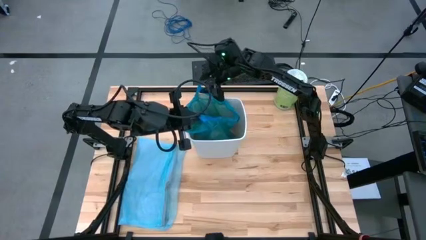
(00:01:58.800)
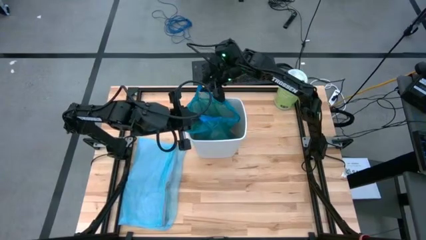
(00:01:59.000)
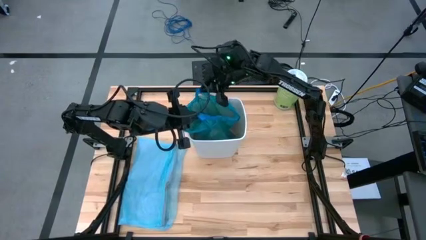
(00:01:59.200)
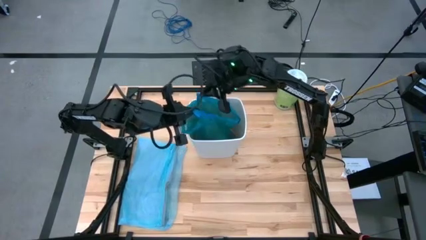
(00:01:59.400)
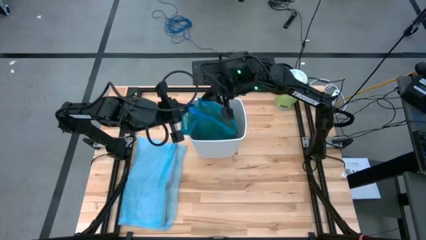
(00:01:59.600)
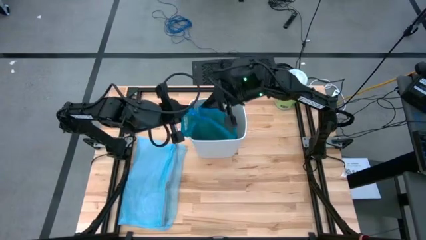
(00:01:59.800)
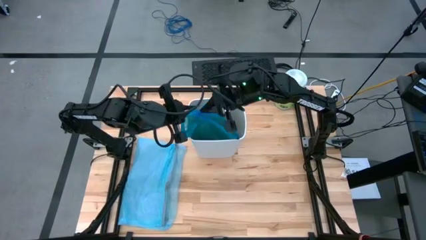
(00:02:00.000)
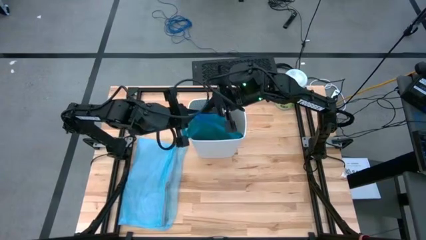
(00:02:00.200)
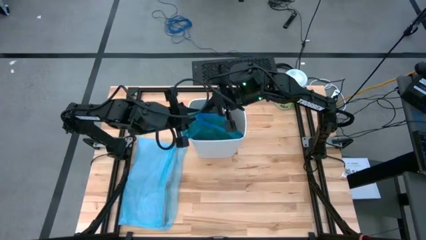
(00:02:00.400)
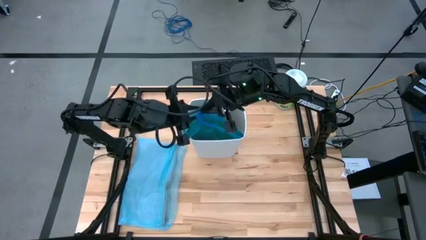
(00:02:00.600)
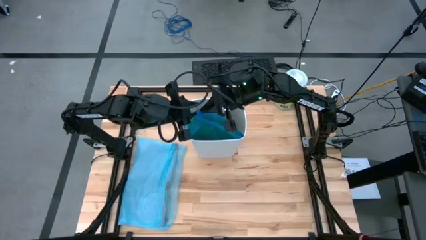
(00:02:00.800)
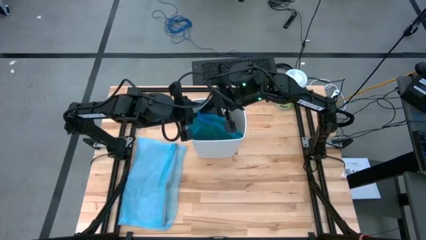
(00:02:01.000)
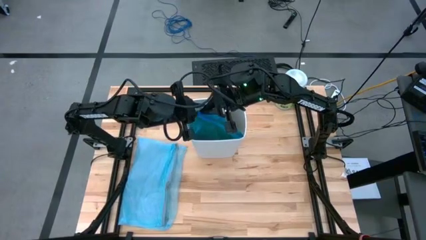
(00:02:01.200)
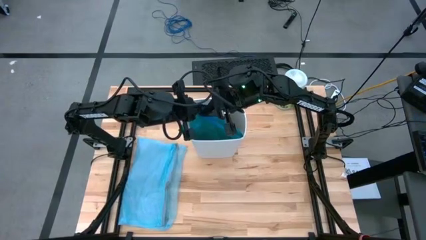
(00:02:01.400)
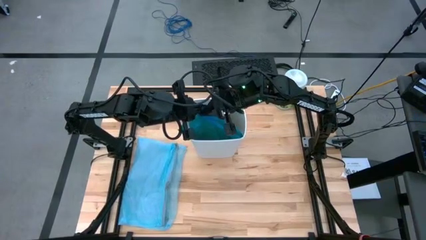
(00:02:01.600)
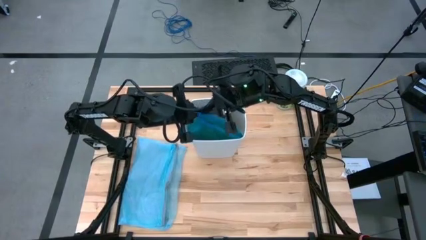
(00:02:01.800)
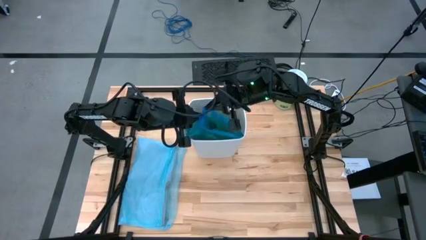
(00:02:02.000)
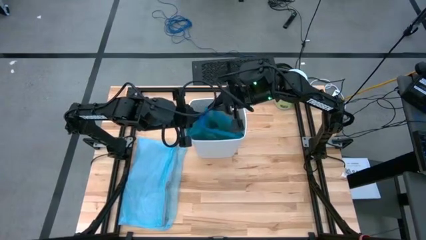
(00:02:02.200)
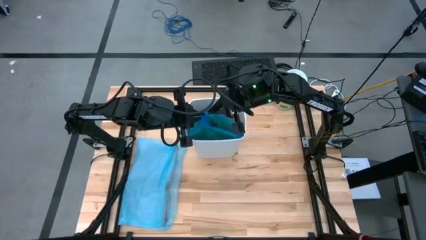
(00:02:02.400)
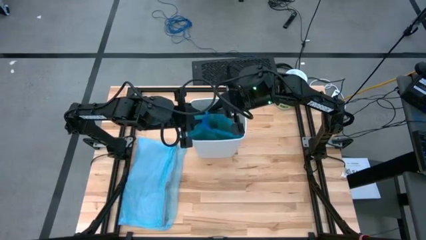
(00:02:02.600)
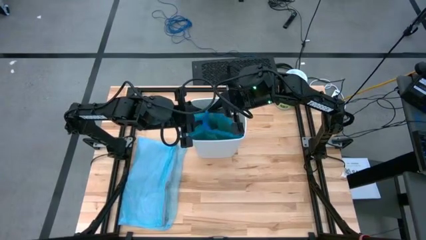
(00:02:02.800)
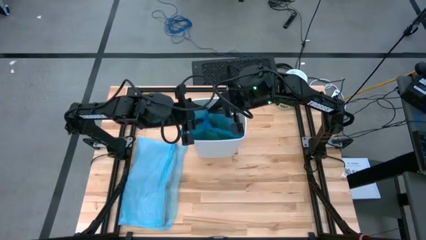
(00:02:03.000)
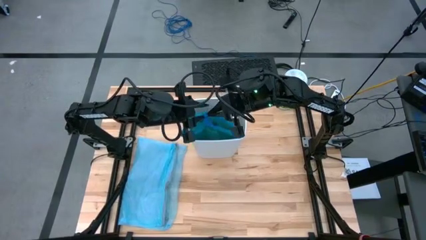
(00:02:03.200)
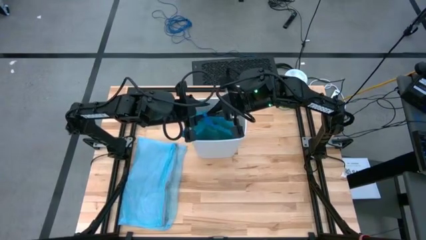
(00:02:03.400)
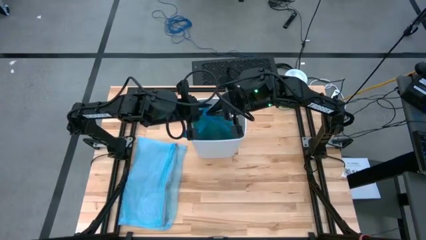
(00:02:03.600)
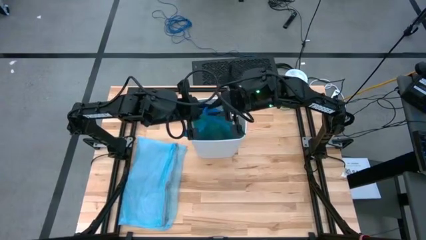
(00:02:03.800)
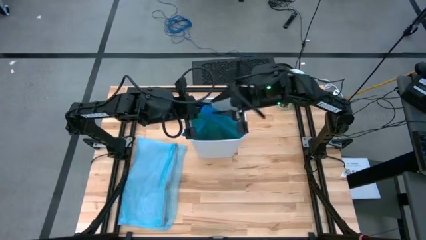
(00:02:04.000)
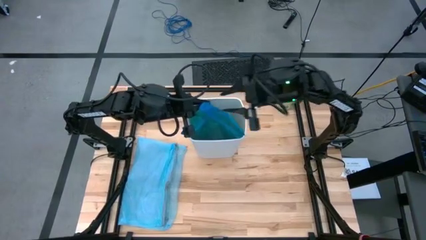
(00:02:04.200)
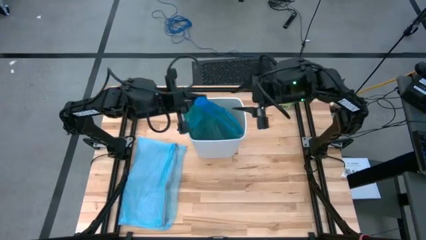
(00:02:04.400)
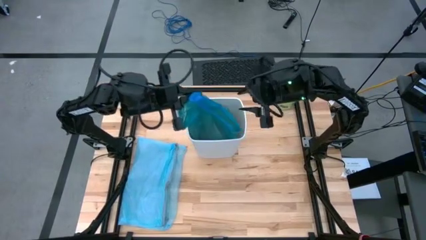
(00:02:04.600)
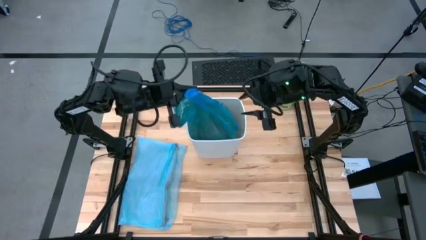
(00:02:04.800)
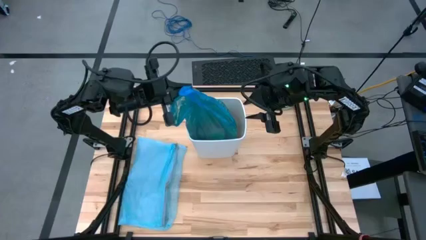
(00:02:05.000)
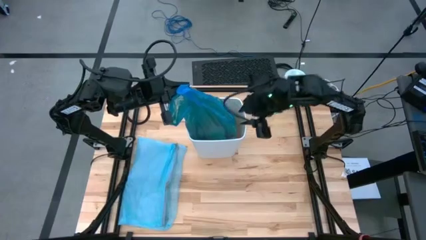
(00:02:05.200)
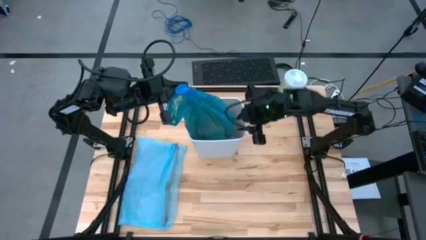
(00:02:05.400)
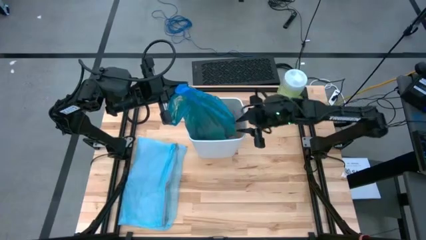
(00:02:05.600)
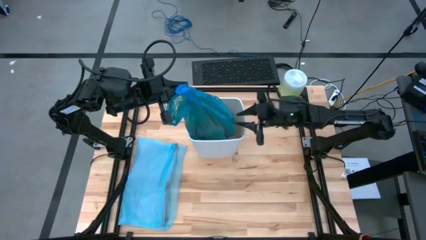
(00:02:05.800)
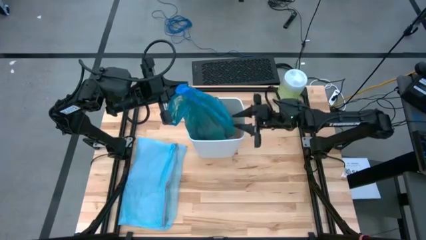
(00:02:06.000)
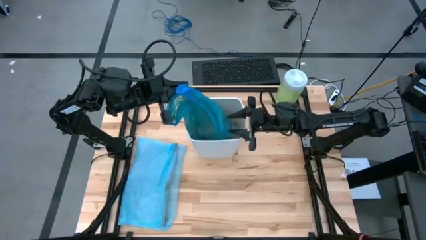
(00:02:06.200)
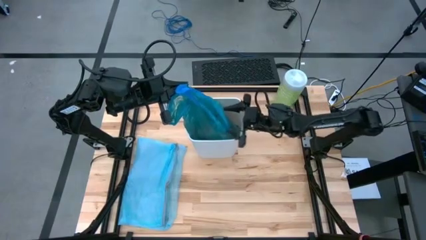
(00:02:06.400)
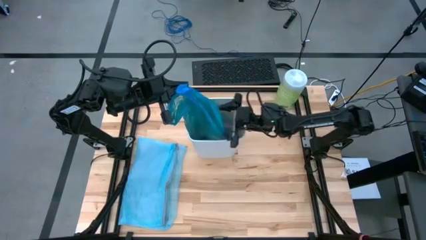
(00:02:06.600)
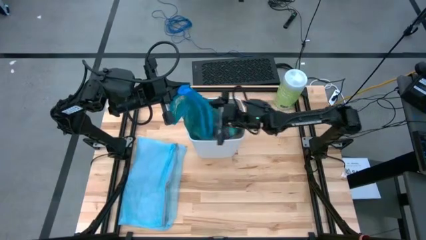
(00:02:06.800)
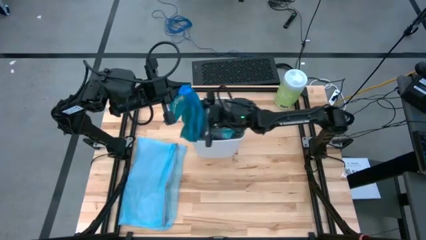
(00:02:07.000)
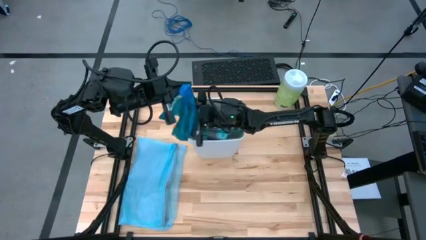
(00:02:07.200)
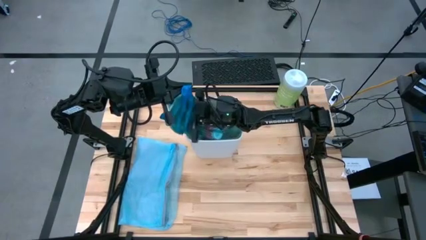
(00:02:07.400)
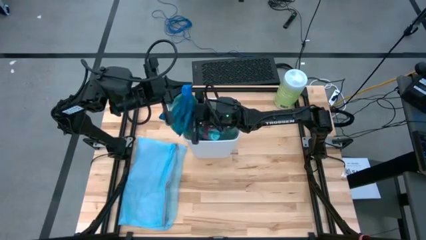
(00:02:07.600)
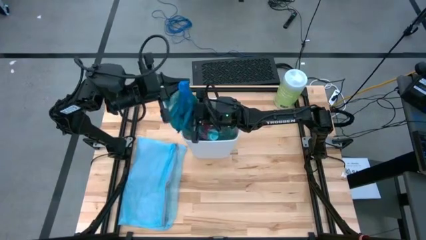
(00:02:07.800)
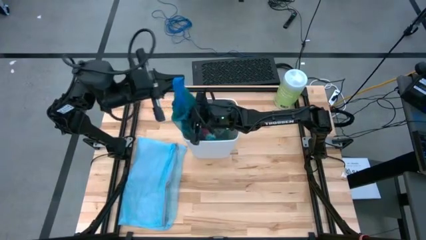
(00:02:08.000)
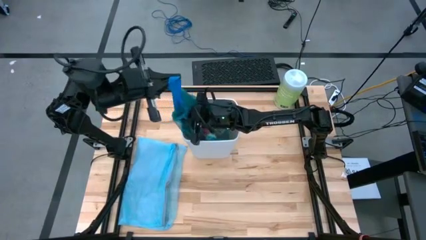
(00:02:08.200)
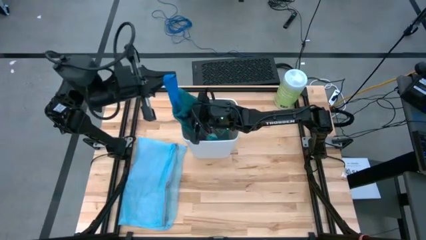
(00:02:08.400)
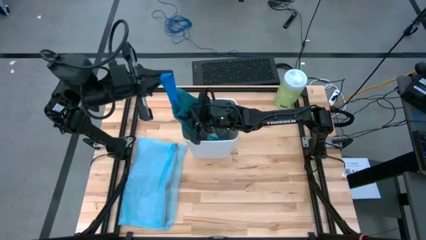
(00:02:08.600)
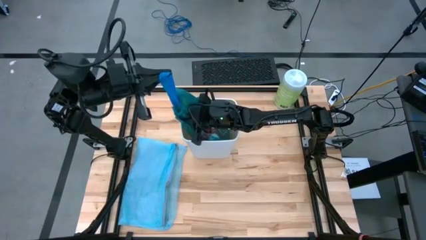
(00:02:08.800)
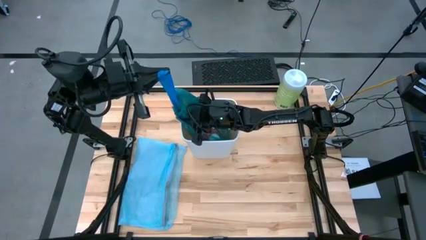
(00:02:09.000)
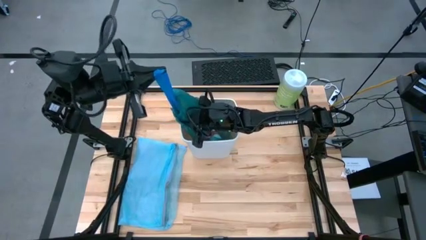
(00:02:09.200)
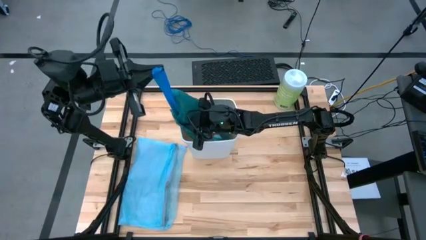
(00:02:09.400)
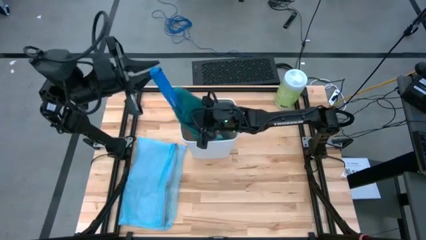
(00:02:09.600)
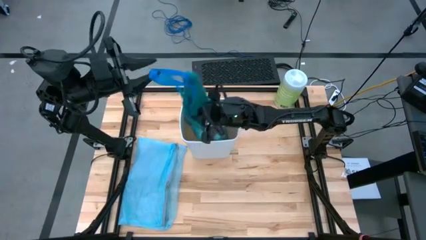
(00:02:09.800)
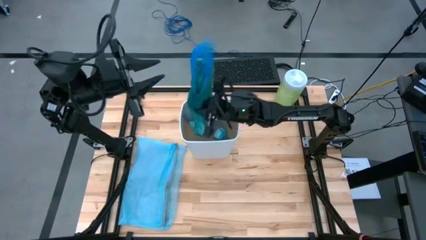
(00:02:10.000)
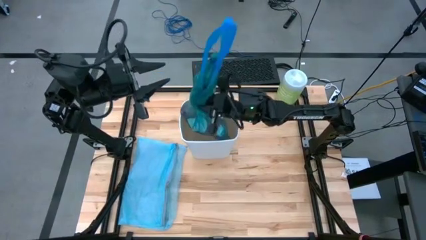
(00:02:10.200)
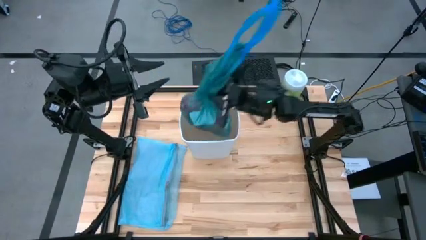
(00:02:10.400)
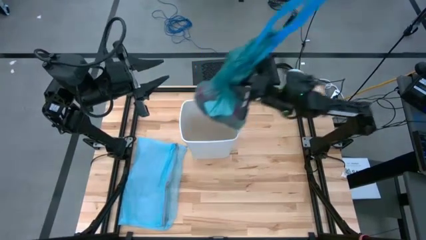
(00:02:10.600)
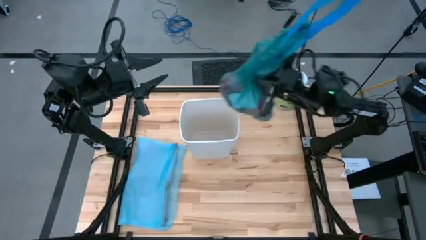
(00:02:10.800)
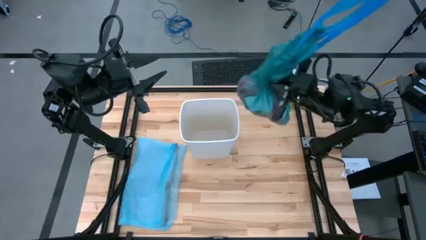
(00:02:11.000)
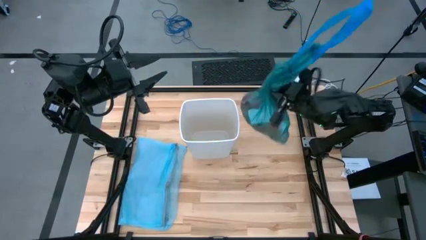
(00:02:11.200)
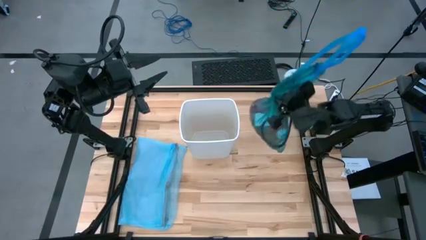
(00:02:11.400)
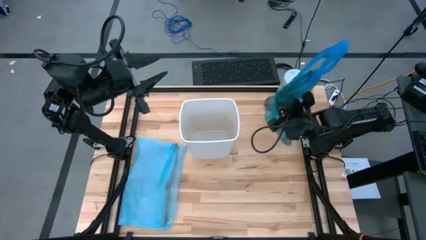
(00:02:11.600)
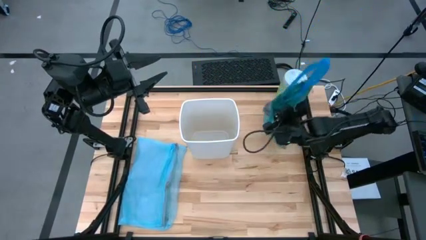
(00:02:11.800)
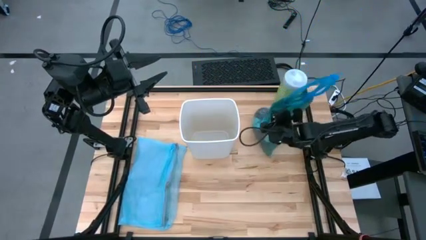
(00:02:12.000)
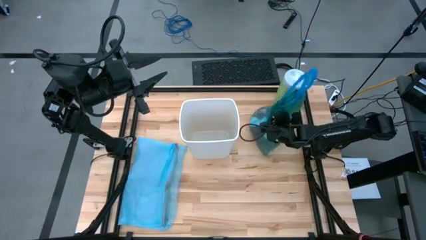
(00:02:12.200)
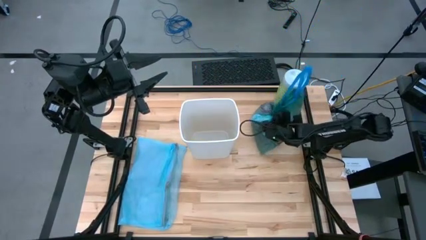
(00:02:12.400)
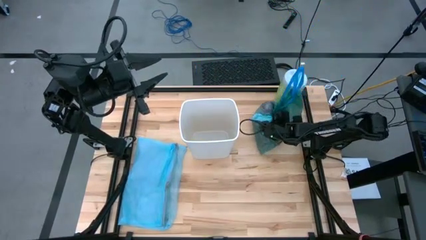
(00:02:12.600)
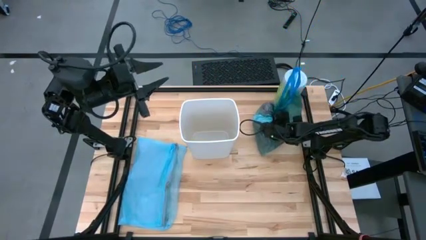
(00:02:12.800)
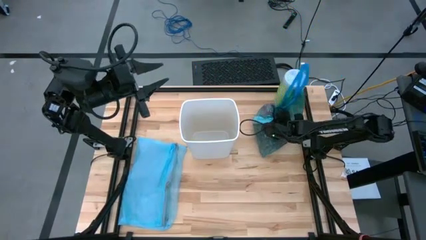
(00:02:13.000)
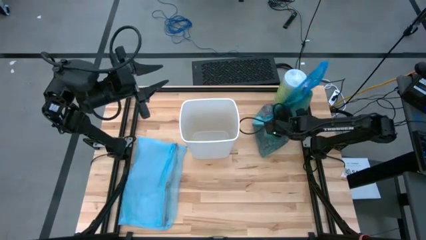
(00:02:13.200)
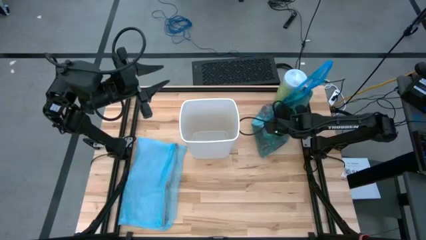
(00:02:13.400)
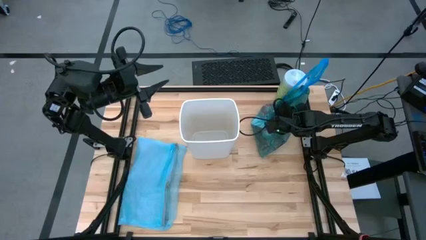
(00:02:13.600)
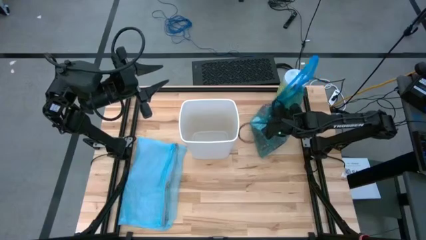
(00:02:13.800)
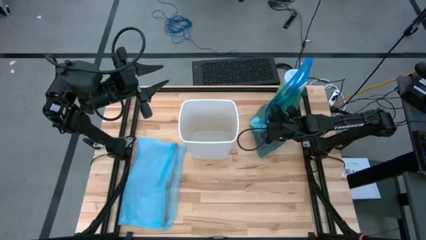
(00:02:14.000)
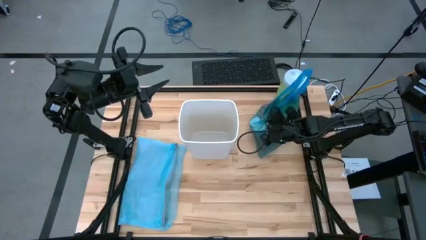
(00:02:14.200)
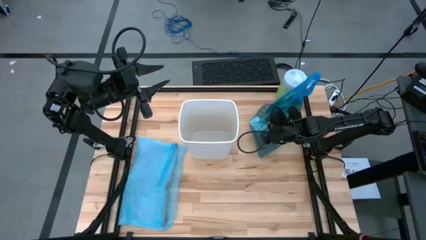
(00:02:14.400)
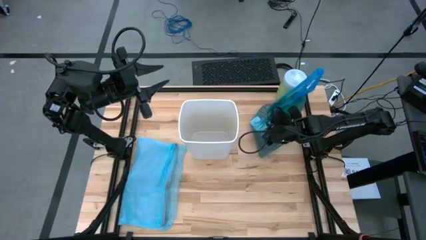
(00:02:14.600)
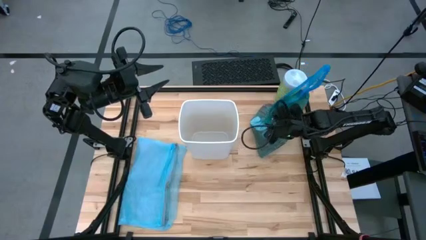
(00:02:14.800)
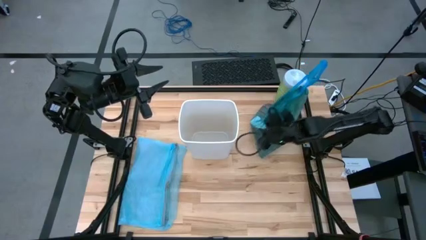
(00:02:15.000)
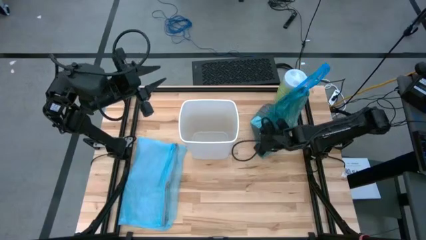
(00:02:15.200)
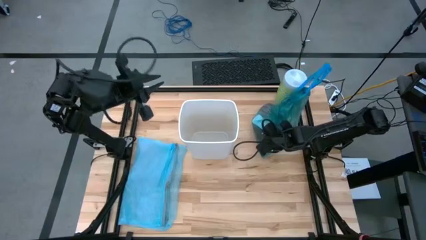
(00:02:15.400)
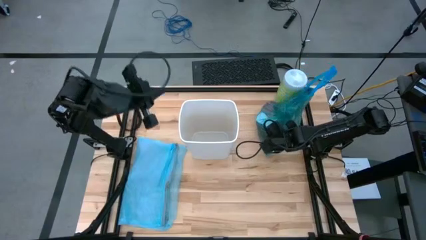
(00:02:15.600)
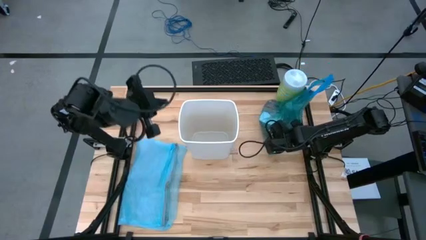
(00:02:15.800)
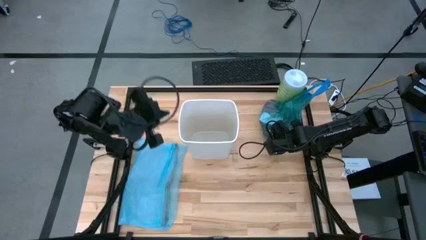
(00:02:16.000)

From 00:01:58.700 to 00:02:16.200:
Task: place trash/remove bag and relplace
Remove the blue trash bag from the white trash bin
